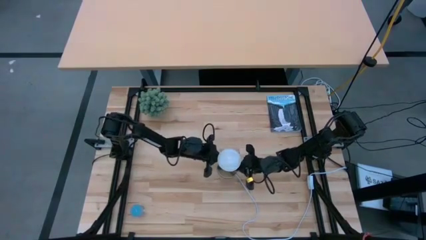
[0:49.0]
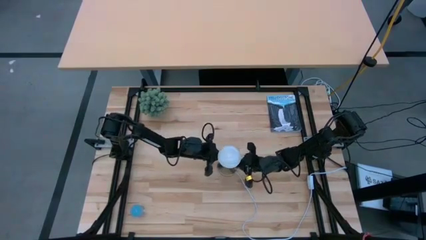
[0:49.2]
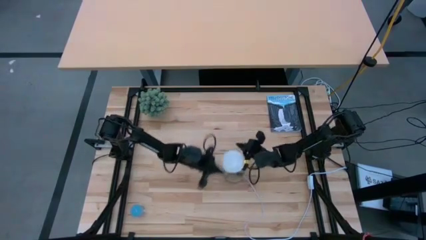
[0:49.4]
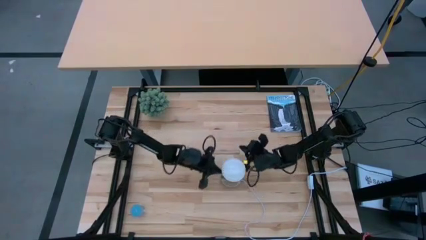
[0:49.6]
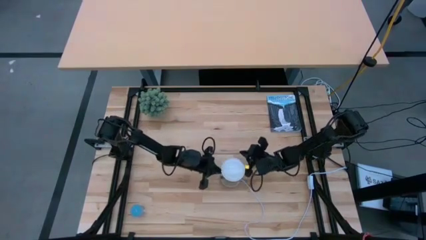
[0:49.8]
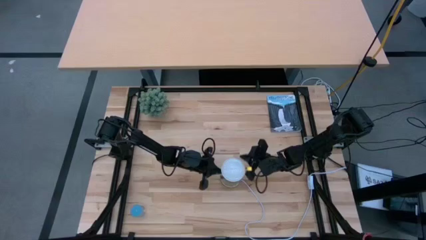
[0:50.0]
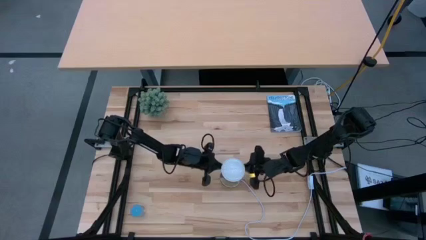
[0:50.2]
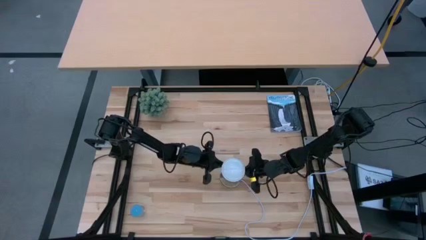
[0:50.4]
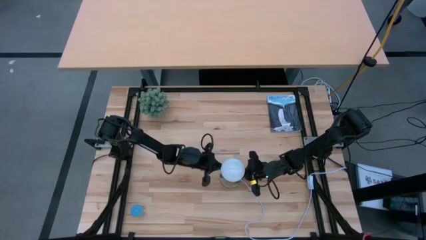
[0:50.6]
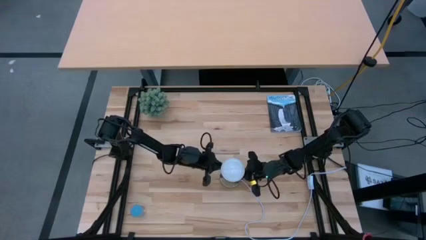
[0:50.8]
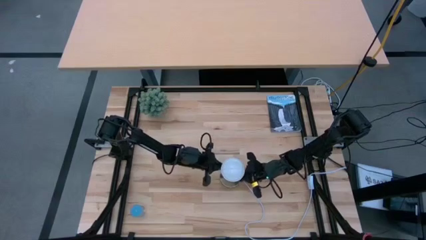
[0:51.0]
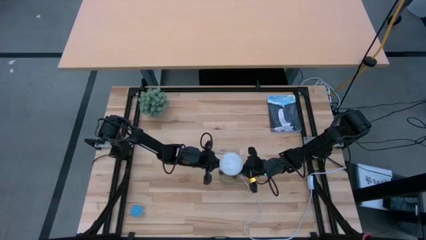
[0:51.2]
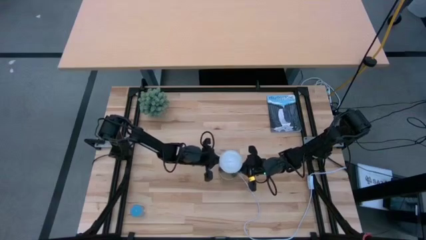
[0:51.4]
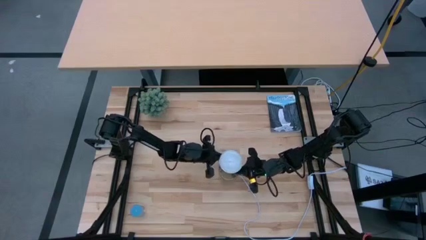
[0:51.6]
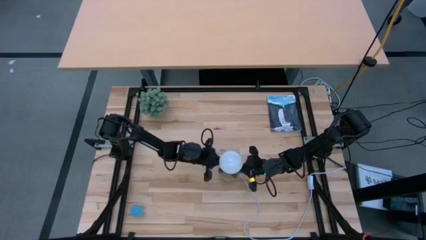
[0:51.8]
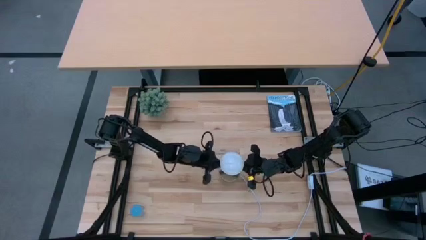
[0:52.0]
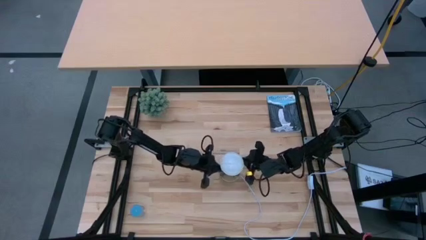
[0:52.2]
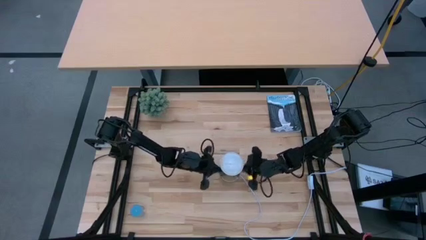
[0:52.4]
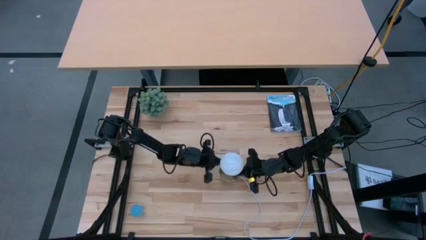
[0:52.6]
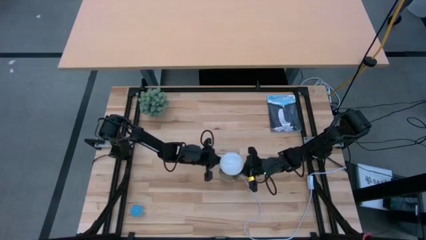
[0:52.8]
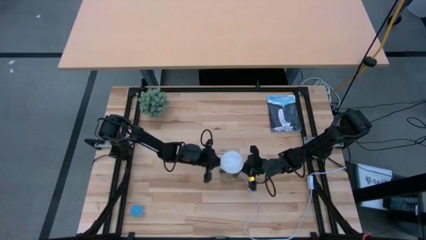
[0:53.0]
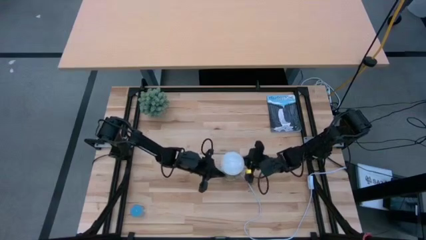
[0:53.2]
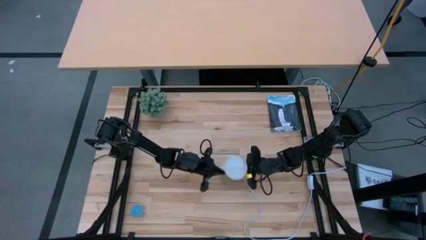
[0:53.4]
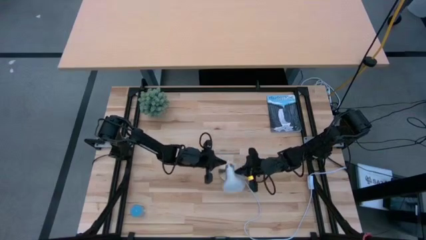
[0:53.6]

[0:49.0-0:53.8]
Task: Screw lightbulb
Remove the lightbulb from the lamp

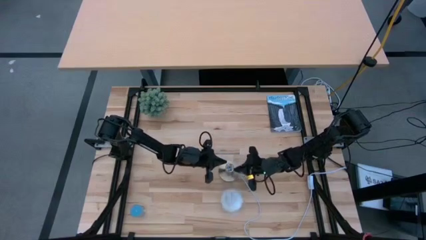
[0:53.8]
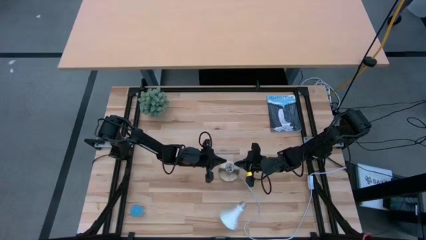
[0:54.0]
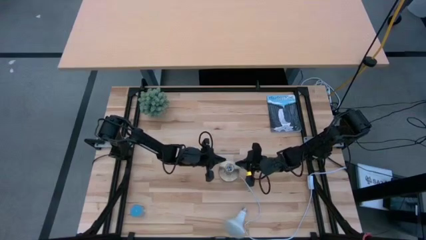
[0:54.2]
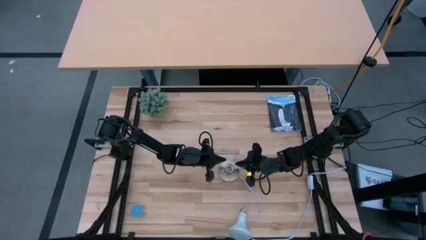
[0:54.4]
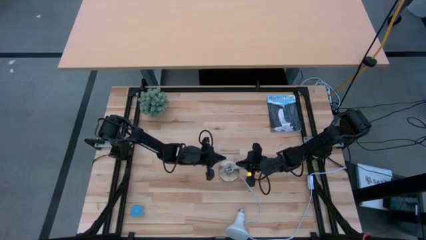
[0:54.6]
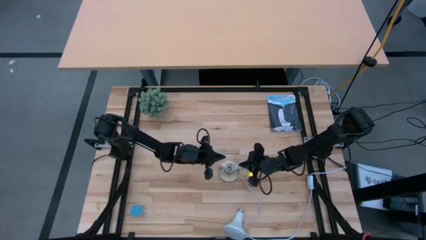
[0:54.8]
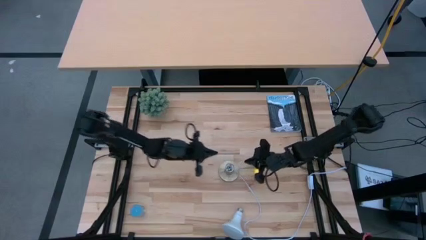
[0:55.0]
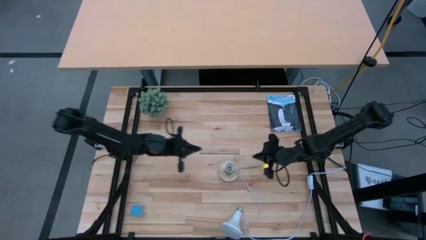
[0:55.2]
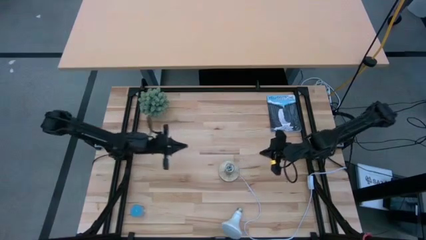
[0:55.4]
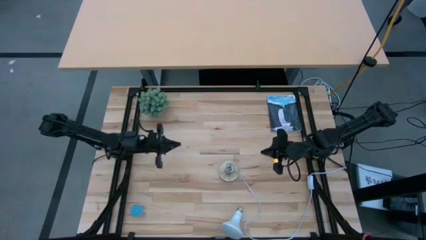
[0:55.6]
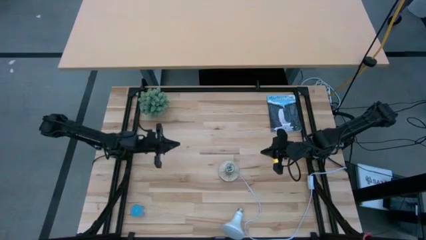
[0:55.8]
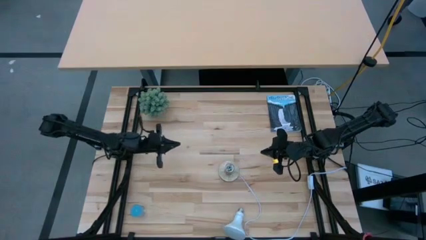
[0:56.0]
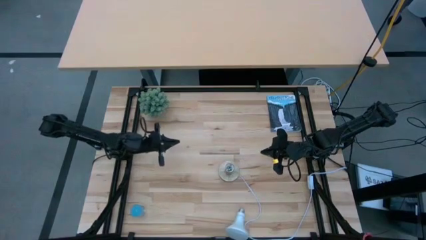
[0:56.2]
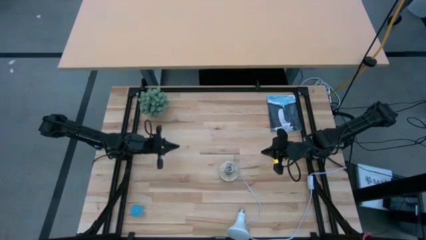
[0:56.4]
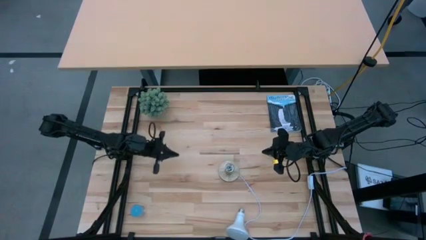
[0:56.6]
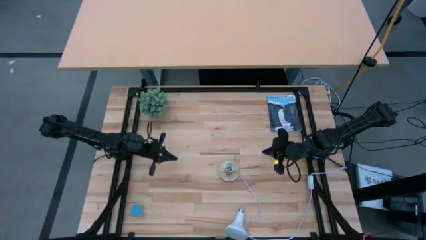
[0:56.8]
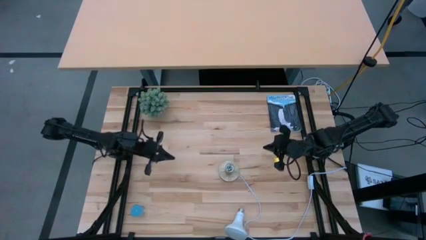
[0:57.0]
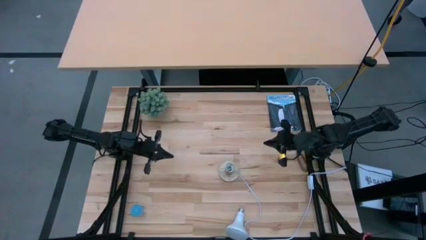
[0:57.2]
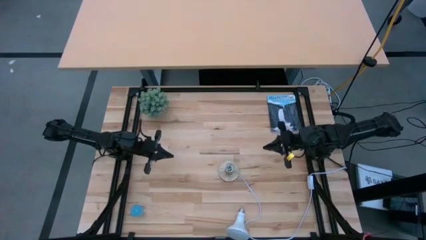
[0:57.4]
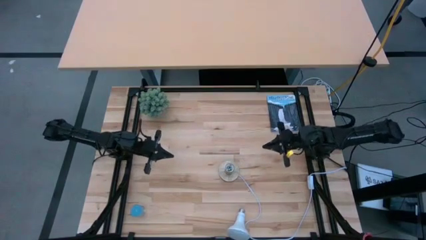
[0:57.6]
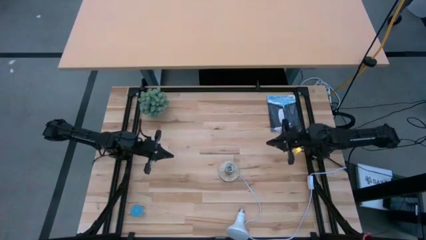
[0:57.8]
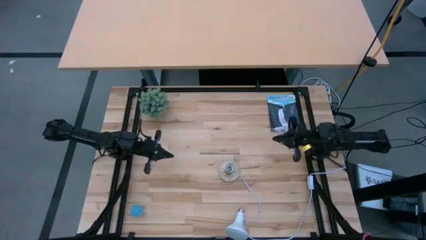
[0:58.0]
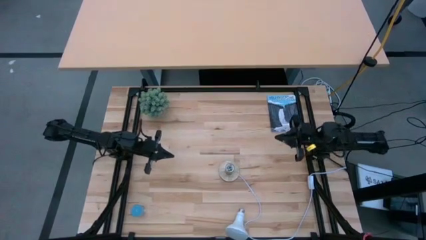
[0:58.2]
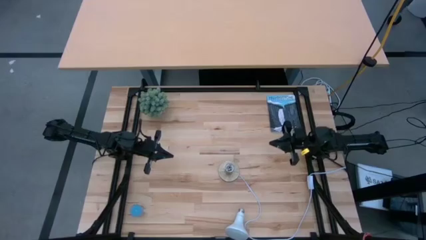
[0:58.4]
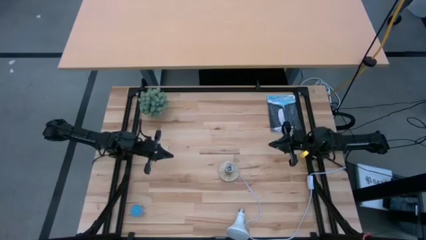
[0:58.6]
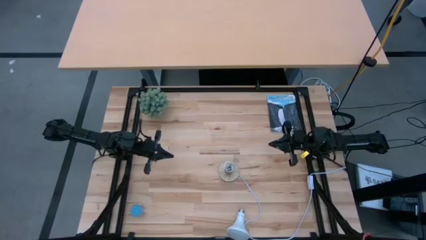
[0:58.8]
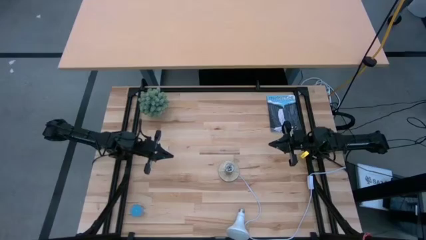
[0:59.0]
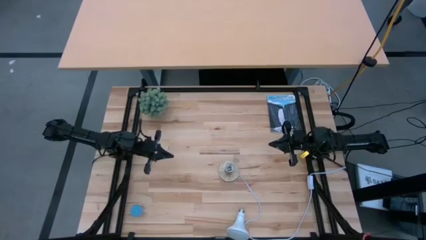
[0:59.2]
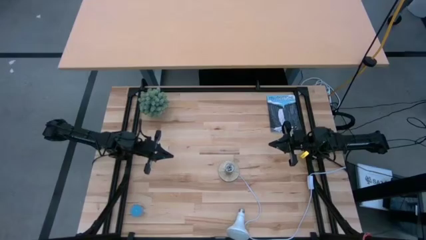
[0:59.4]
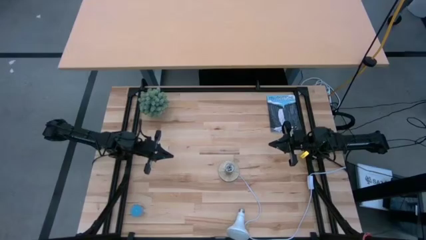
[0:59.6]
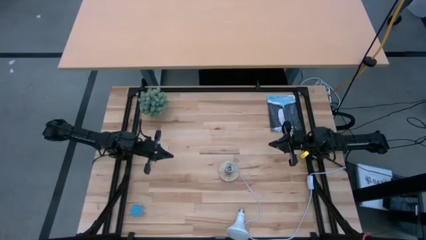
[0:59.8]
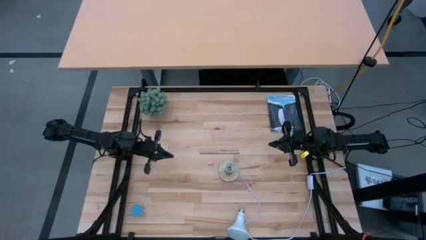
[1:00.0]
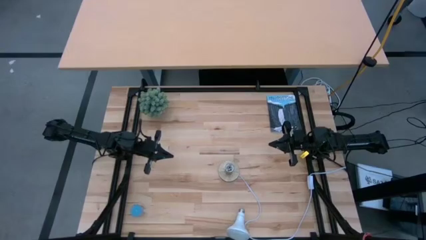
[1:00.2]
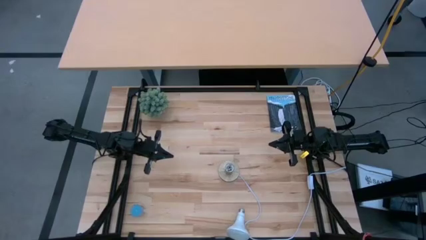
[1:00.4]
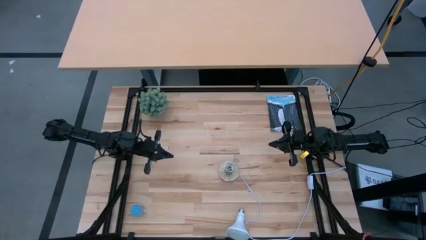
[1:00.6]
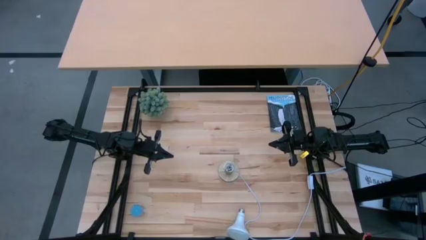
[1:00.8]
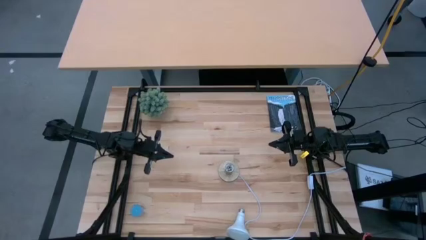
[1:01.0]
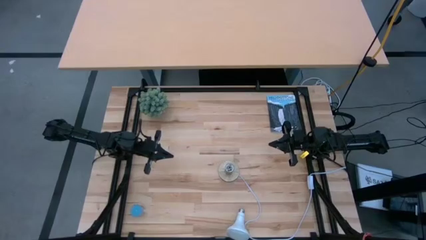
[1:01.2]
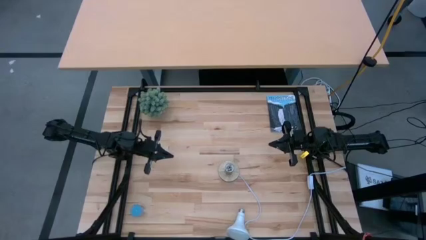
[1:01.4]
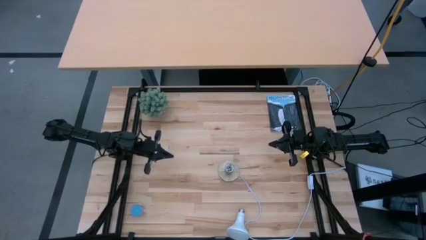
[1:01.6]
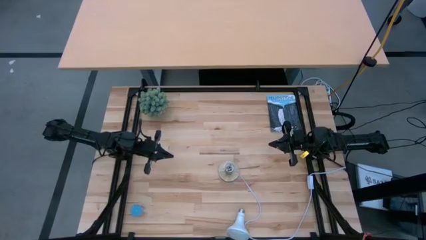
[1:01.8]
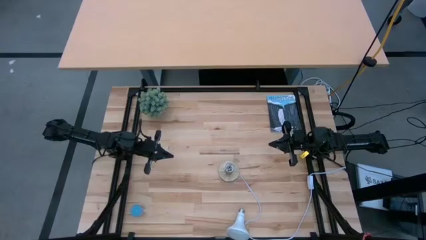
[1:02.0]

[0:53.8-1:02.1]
Return to Home Position

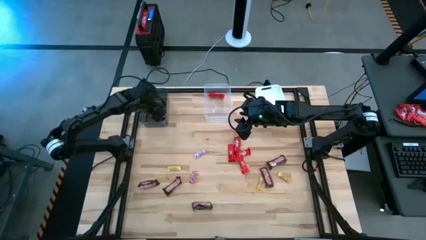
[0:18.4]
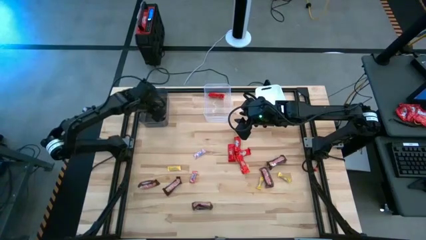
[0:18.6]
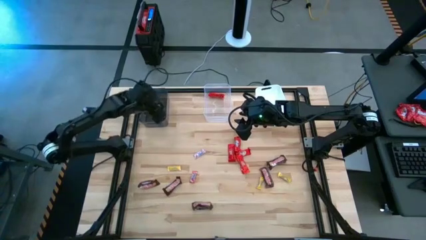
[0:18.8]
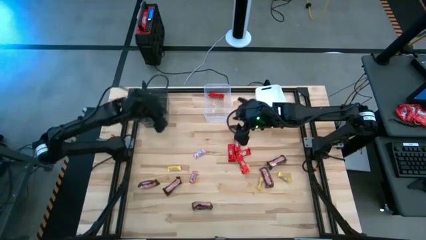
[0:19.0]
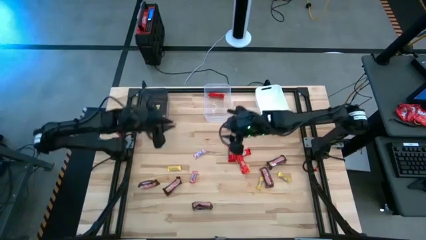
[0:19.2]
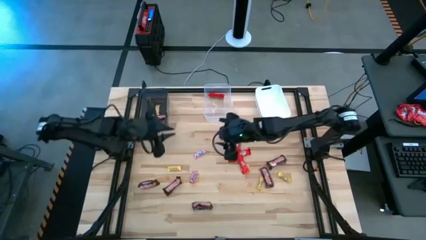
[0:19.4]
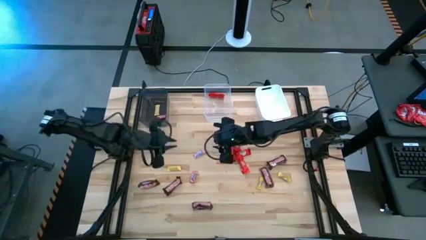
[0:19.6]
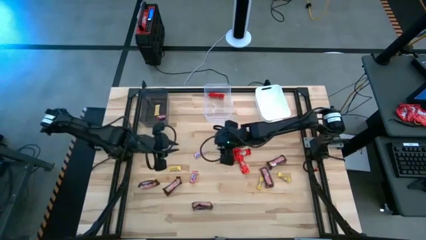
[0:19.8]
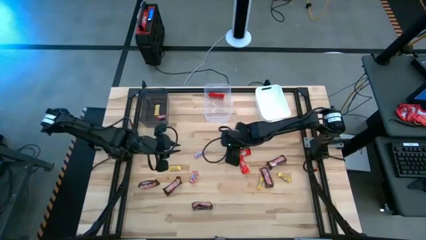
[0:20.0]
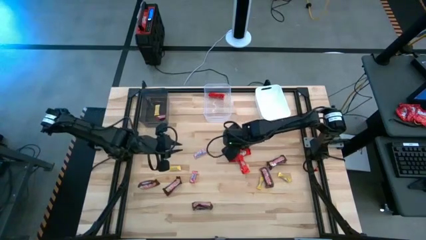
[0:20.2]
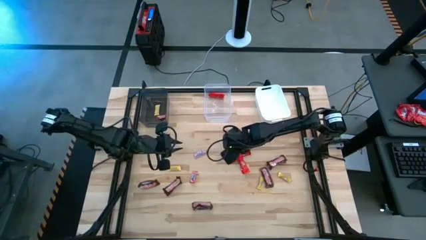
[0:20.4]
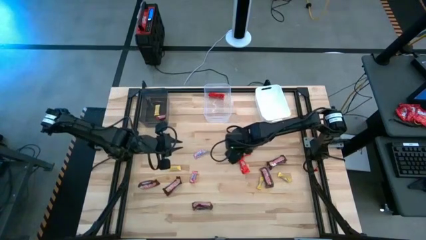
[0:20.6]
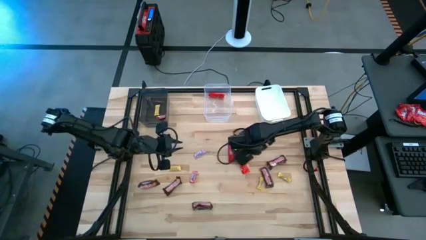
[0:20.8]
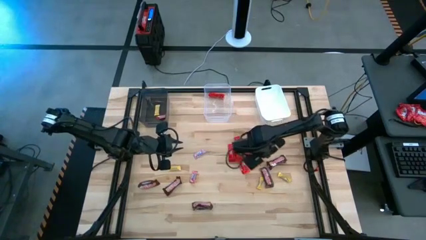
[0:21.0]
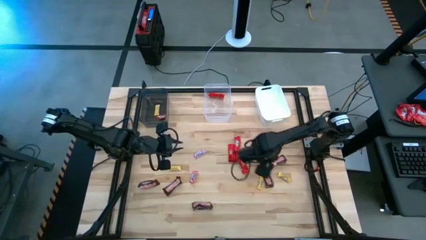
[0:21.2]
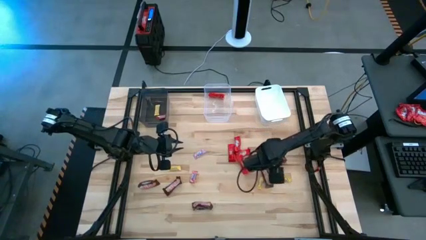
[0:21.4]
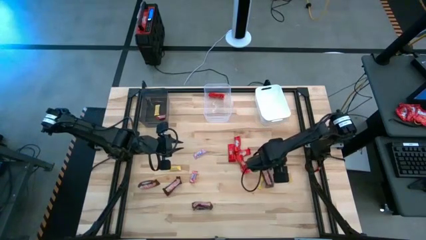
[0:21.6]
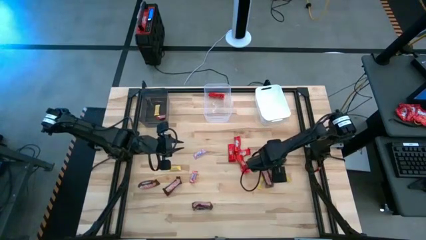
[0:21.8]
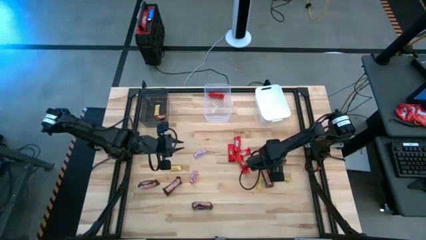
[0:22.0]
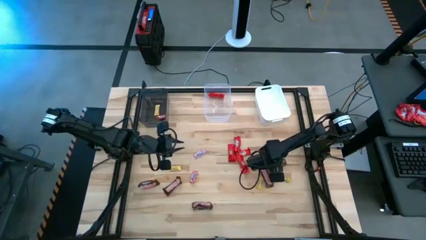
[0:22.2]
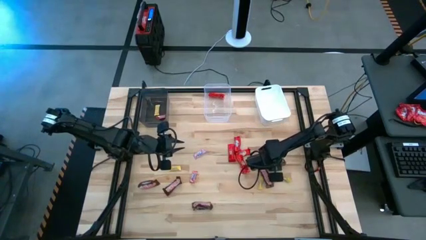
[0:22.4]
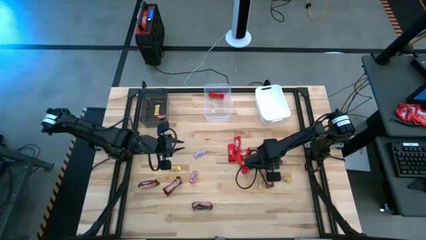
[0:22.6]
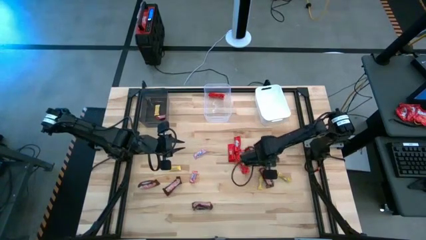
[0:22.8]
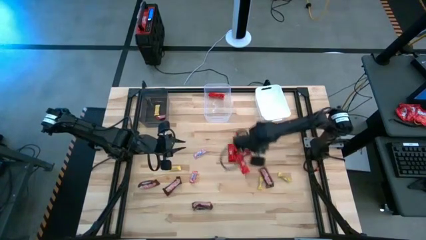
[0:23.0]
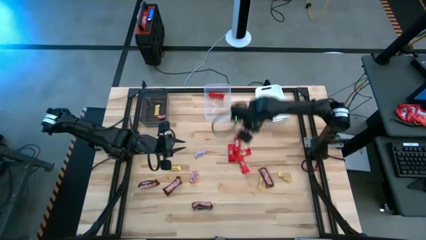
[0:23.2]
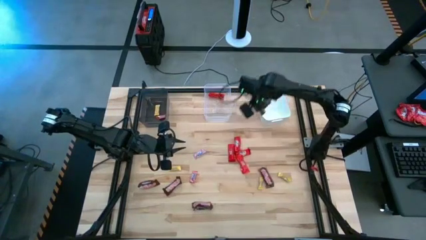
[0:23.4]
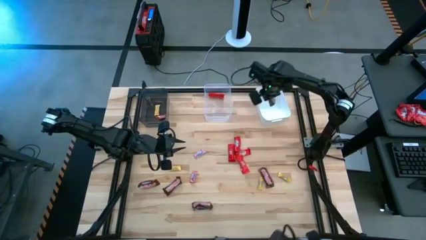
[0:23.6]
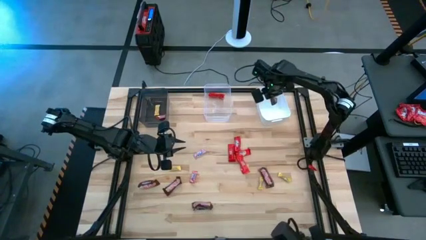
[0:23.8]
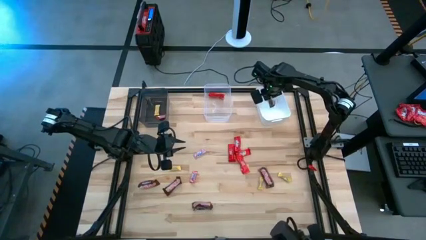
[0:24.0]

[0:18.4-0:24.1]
Task: Sort candy by brand, put in halloween buckets
Put the brown chocolate bar into the white bin
